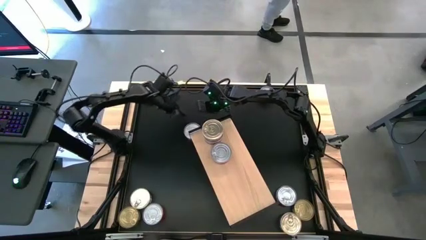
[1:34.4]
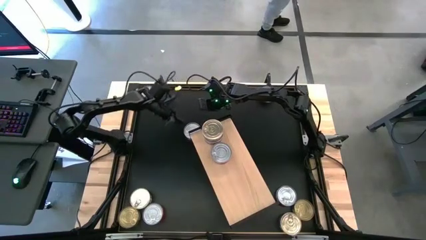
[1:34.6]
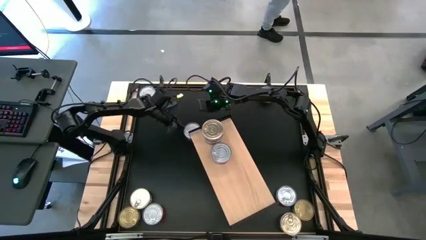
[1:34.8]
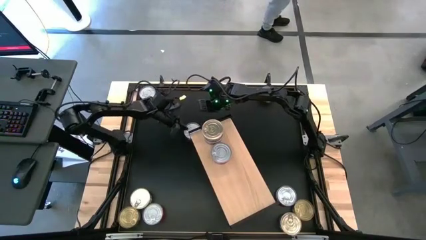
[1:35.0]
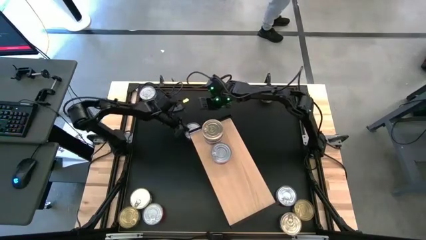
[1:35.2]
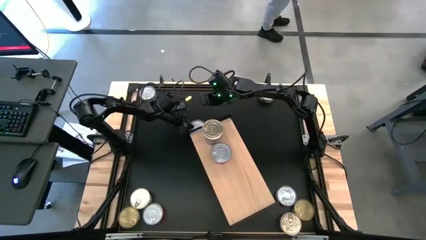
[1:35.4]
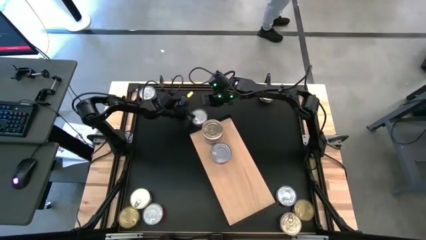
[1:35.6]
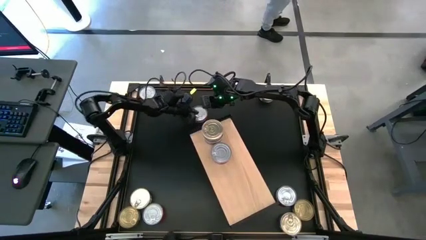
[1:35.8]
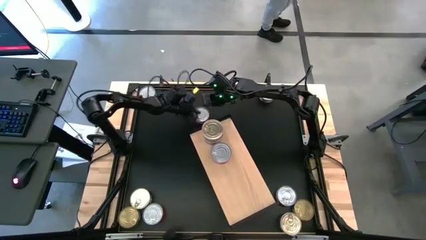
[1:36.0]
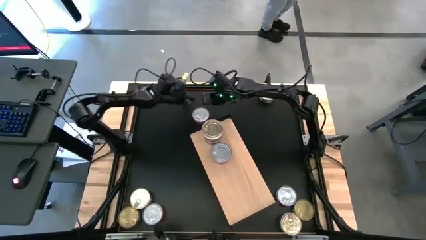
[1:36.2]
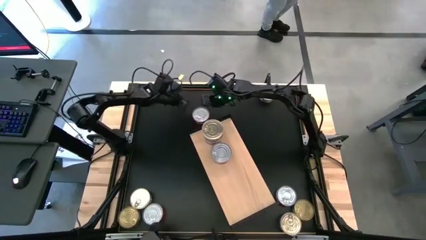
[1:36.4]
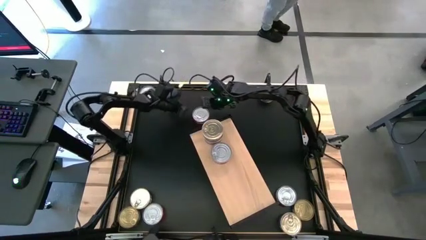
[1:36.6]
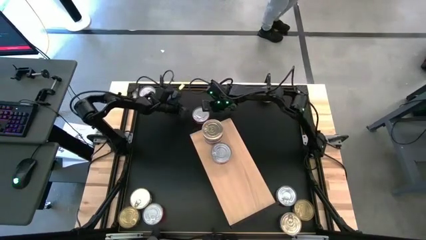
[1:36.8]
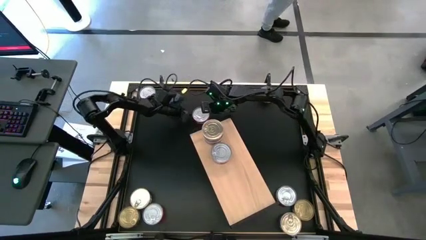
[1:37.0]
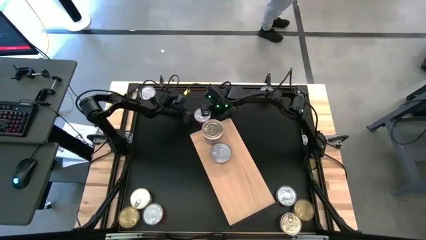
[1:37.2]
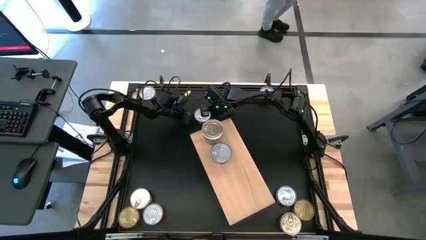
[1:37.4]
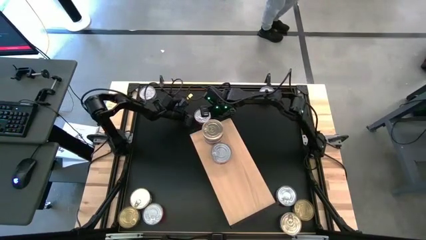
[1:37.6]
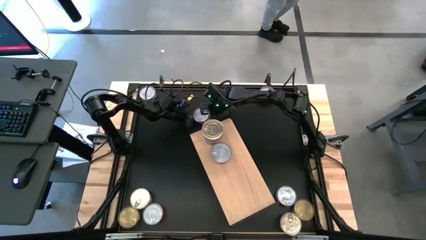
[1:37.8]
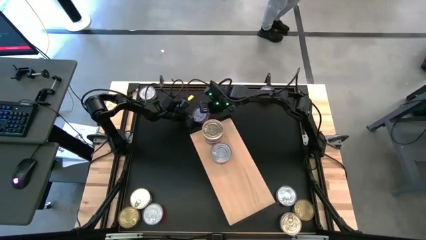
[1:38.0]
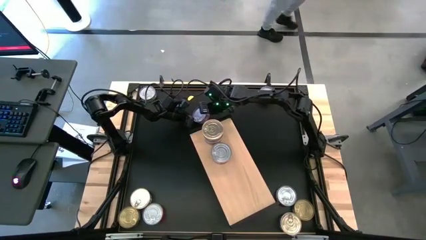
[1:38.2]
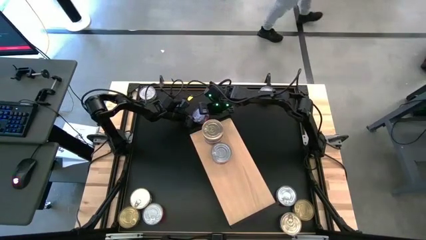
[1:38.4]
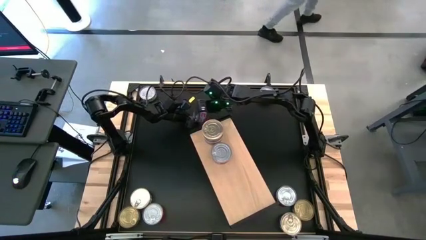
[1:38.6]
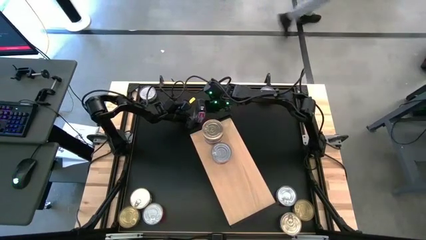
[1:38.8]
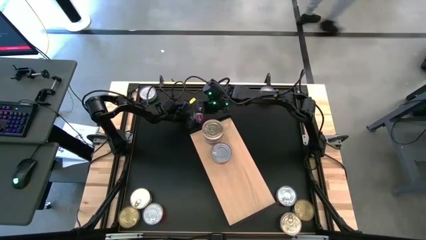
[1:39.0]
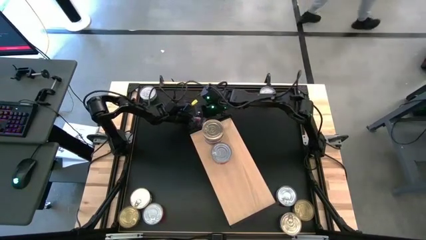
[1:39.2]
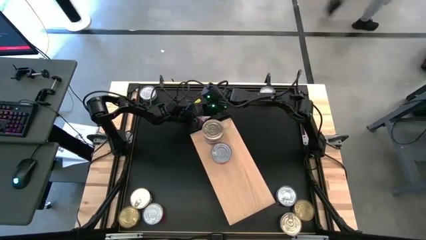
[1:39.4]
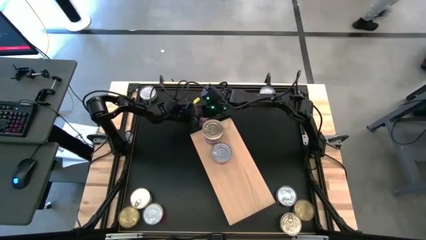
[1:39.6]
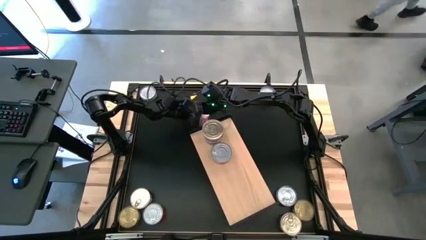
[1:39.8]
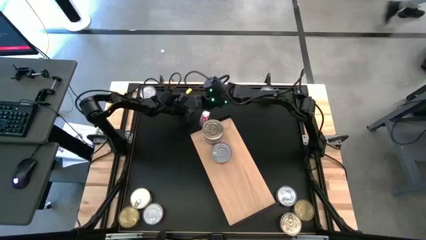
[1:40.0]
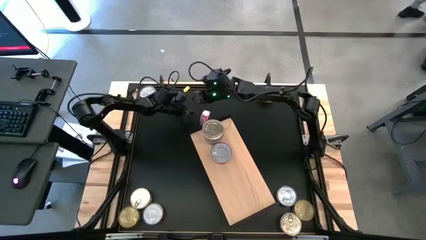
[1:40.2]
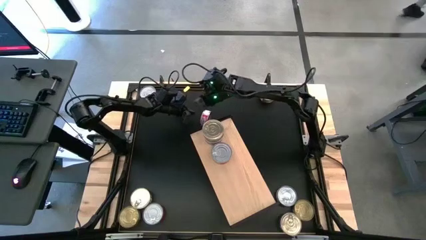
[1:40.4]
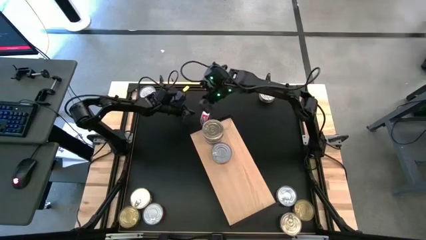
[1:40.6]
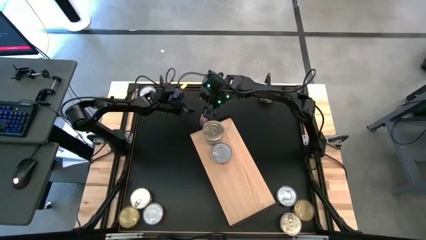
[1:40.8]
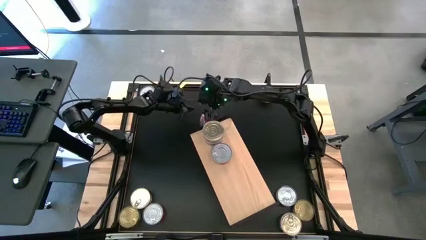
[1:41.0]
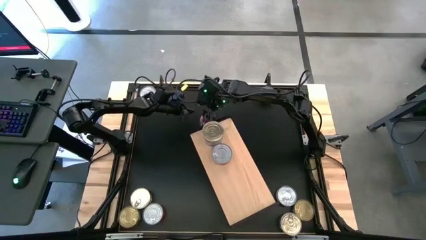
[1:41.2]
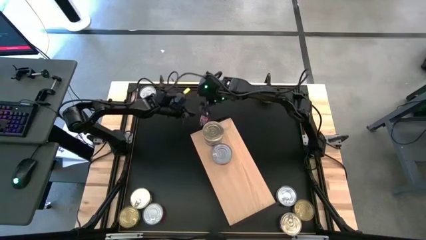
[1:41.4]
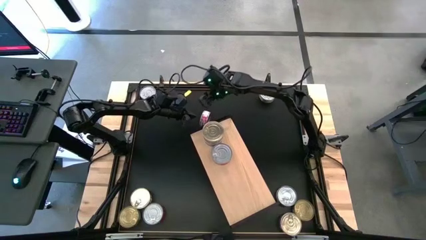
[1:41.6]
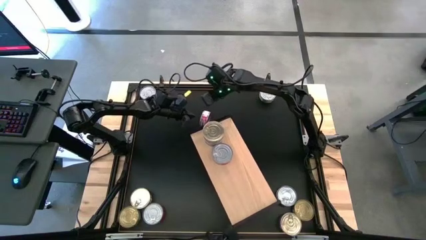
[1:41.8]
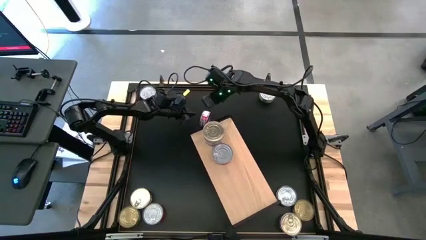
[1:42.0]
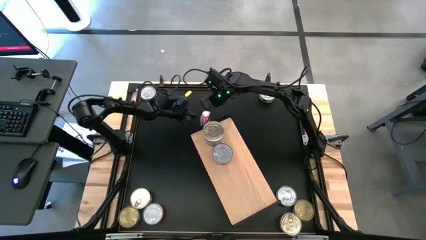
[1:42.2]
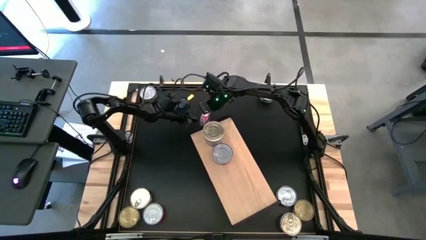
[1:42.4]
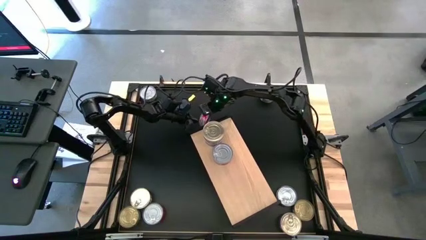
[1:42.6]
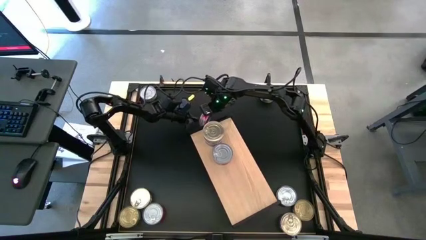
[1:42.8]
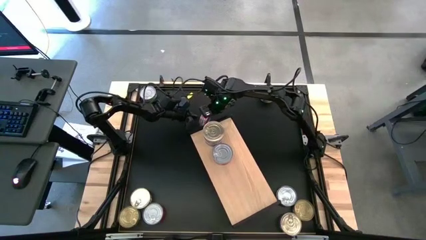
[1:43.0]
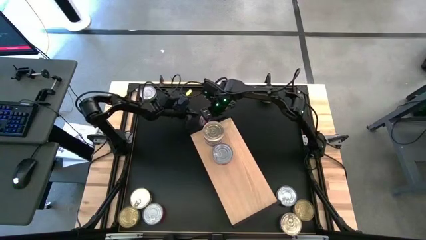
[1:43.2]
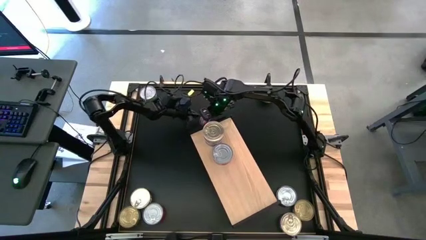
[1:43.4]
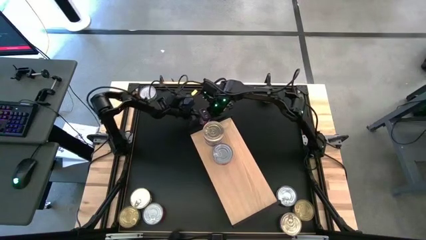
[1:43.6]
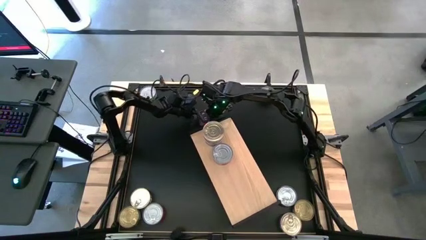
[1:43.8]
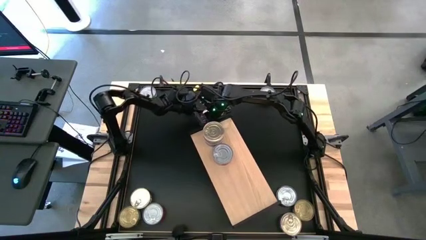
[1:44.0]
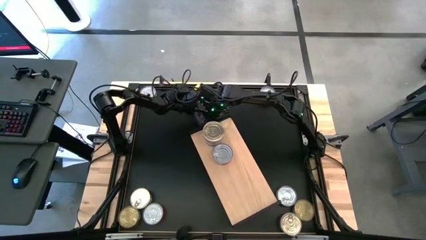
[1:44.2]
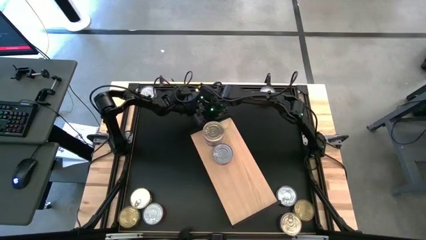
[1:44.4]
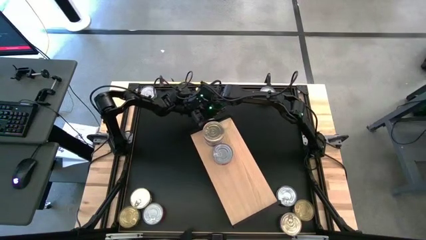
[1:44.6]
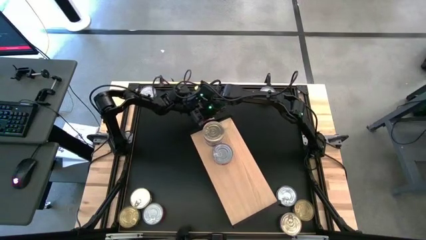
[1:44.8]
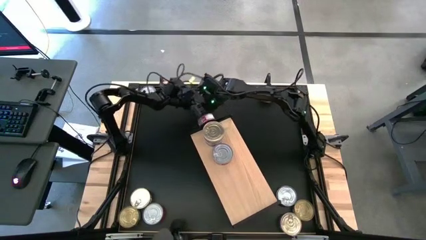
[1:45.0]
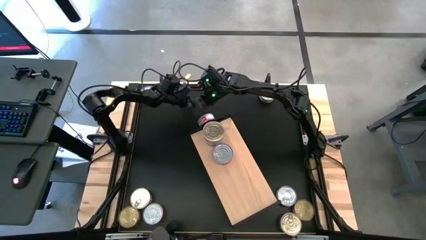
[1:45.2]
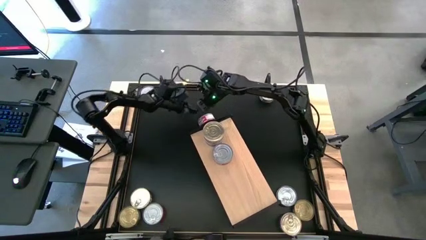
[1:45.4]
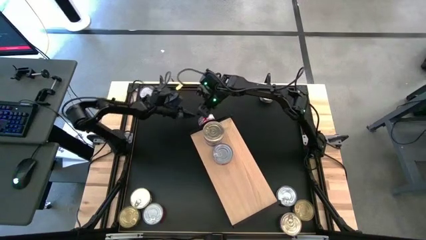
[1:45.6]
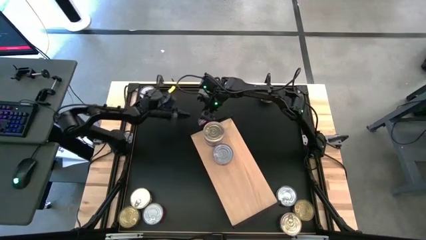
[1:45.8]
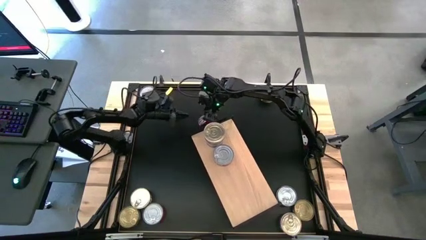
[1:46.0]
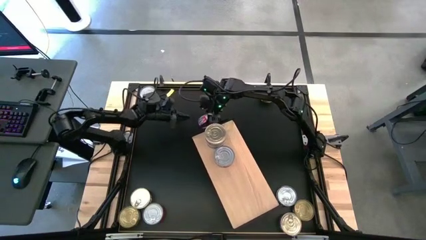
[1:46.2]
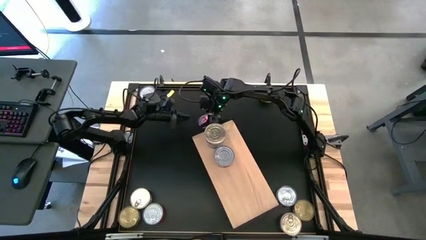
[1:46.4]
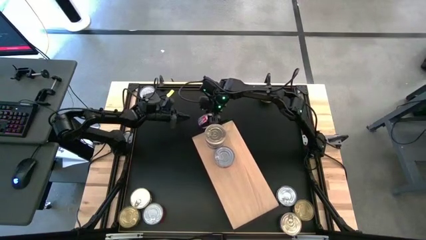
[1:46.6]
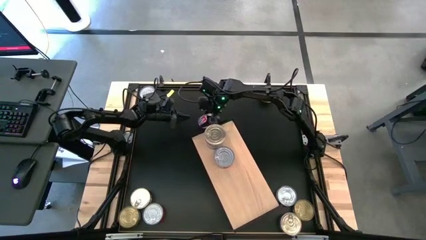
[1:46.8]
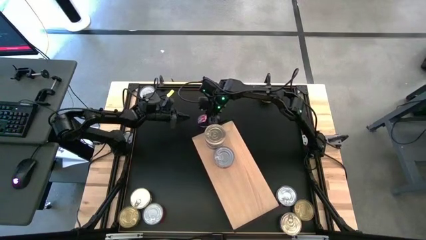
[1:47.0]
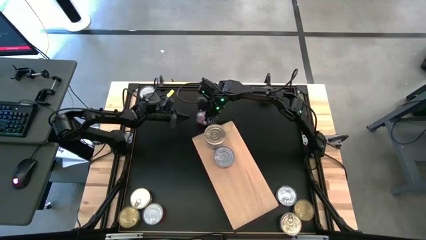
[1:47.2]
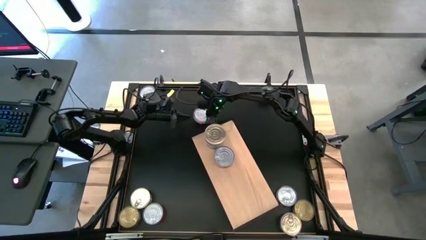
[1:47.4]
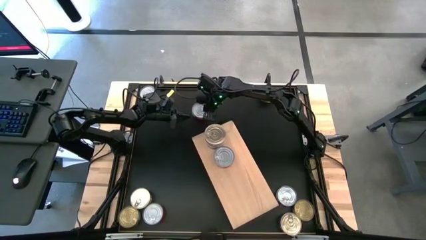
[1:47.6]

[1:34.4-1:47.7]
Task: Stack canned seafood by type on shelf
Stack the red tuna can on top of the red tuna can on the shelf
